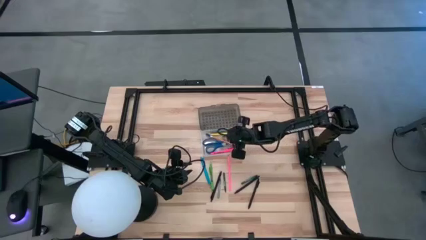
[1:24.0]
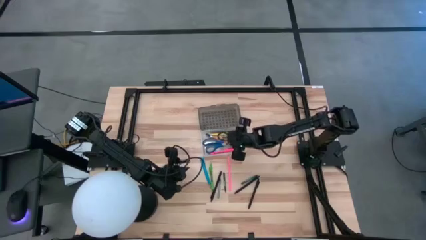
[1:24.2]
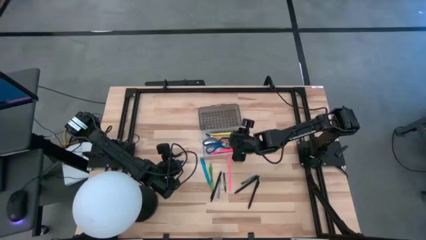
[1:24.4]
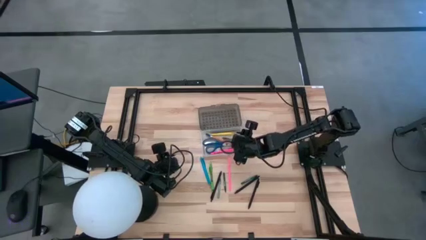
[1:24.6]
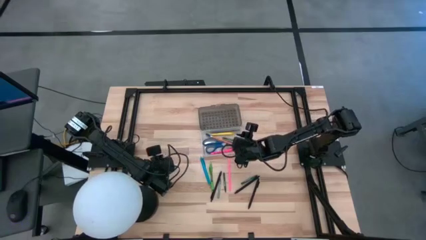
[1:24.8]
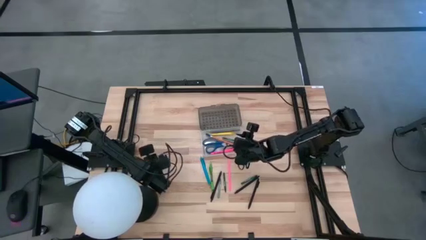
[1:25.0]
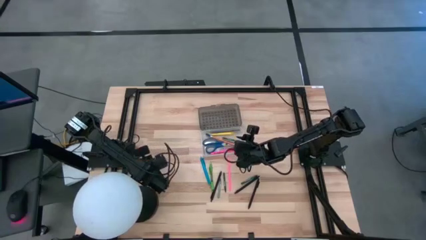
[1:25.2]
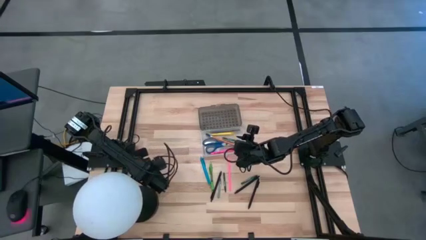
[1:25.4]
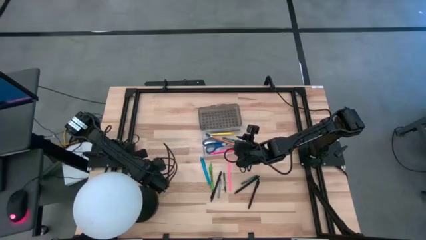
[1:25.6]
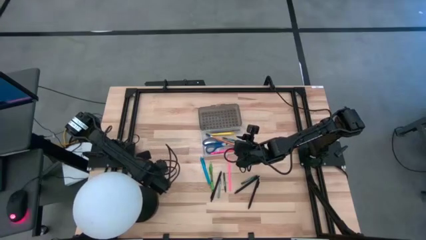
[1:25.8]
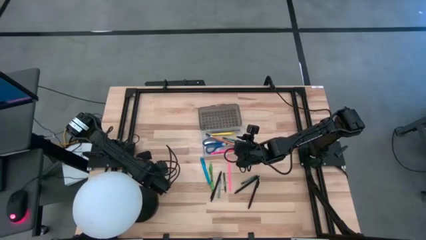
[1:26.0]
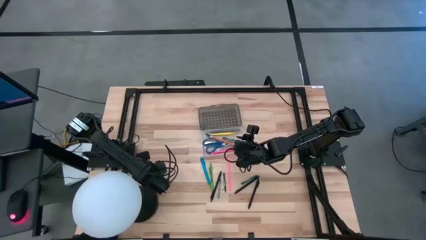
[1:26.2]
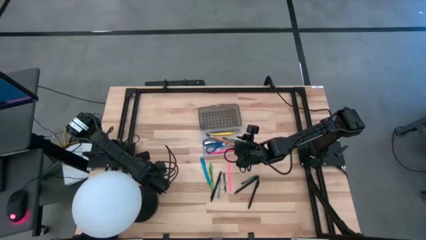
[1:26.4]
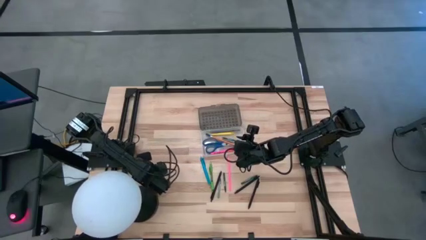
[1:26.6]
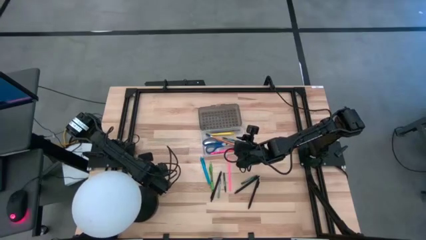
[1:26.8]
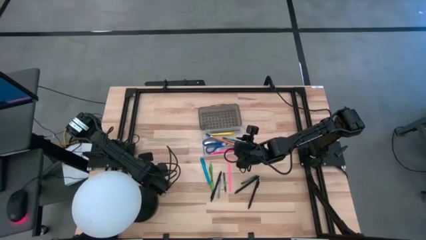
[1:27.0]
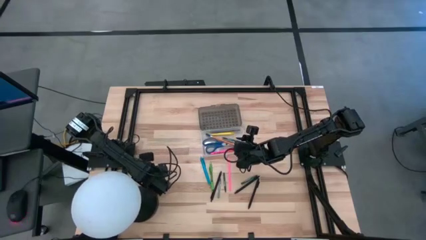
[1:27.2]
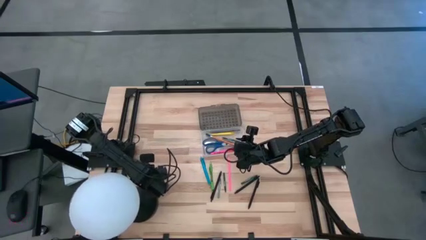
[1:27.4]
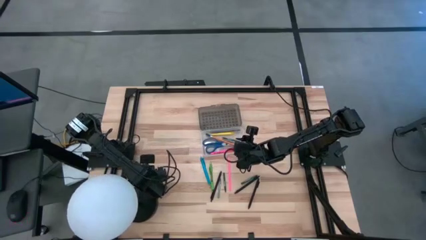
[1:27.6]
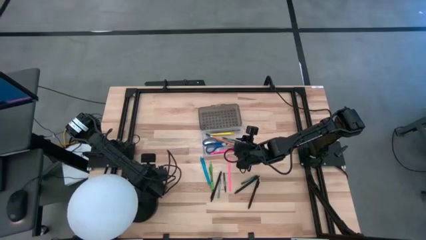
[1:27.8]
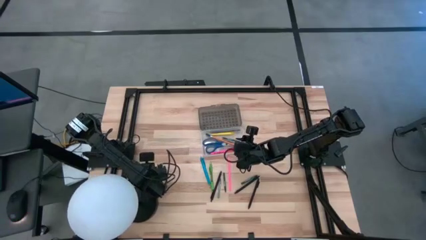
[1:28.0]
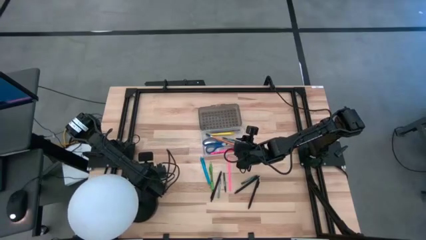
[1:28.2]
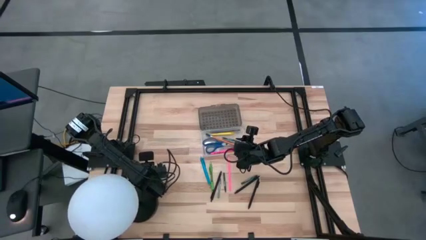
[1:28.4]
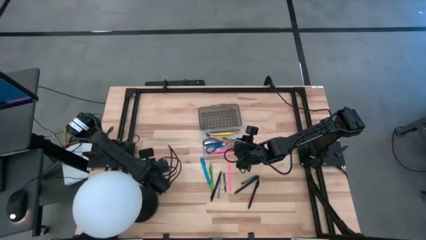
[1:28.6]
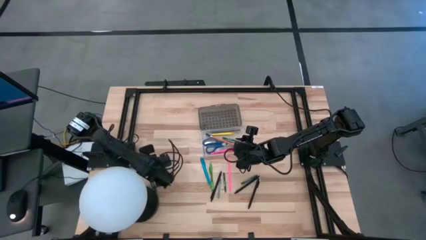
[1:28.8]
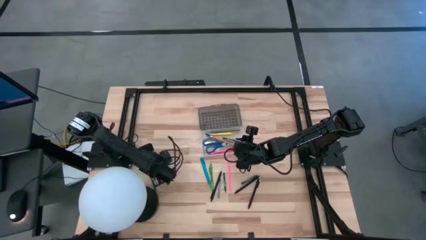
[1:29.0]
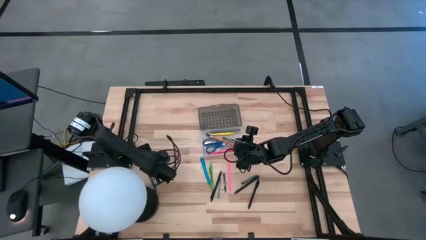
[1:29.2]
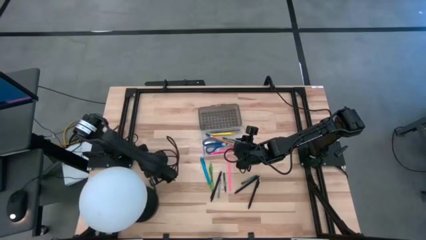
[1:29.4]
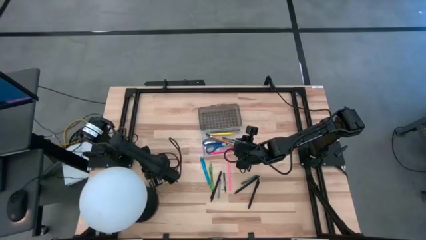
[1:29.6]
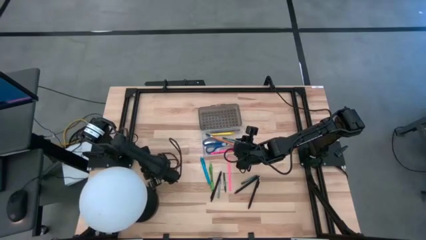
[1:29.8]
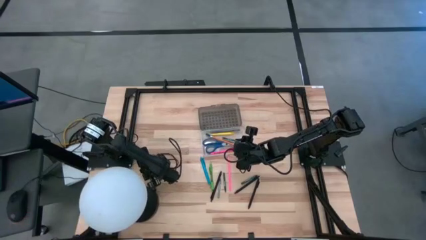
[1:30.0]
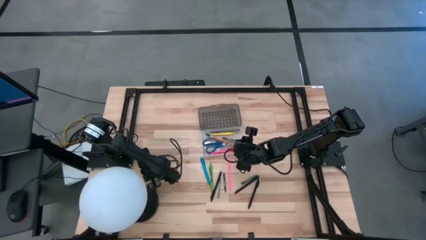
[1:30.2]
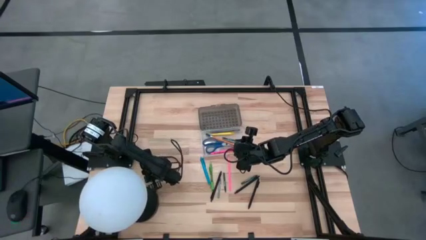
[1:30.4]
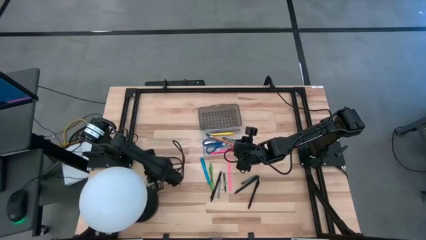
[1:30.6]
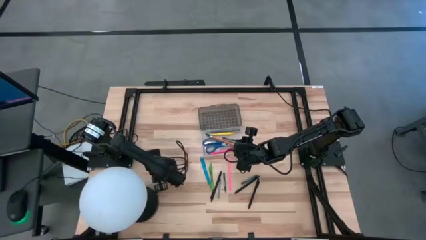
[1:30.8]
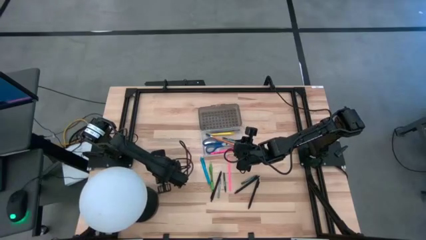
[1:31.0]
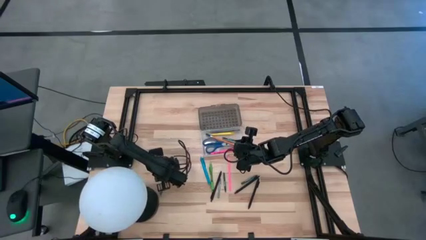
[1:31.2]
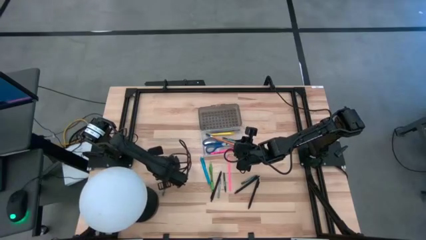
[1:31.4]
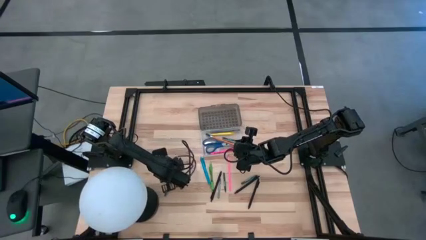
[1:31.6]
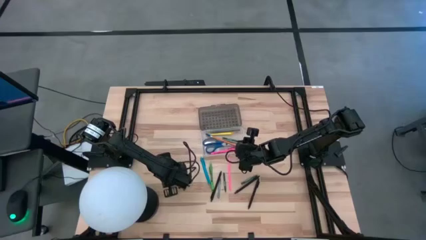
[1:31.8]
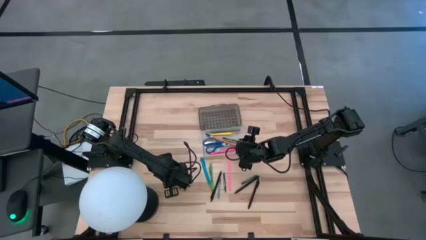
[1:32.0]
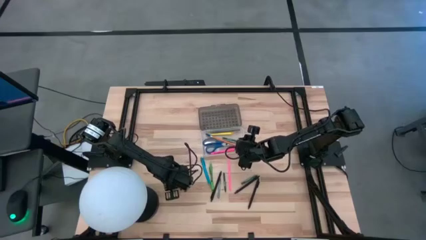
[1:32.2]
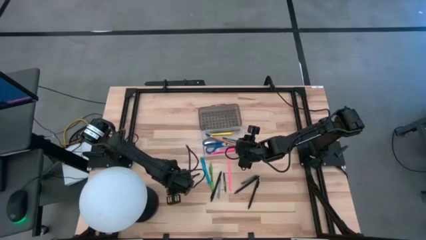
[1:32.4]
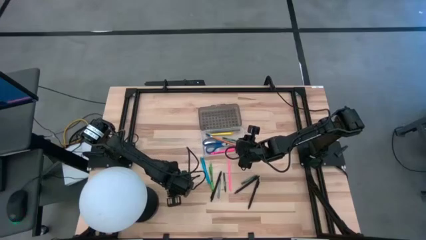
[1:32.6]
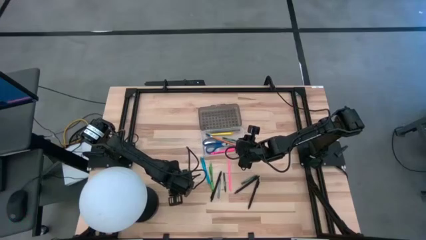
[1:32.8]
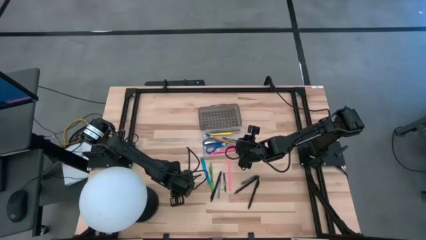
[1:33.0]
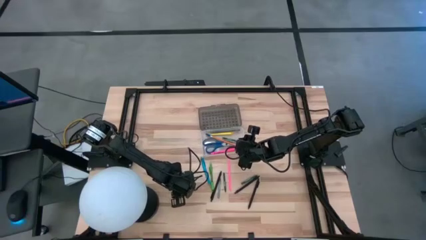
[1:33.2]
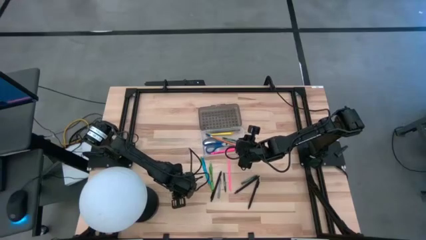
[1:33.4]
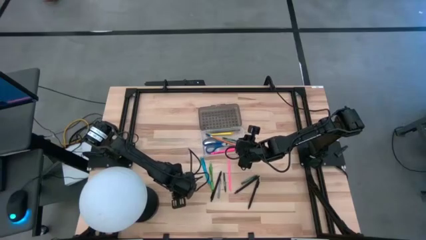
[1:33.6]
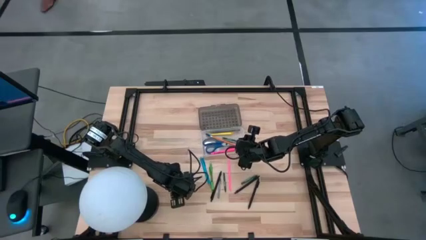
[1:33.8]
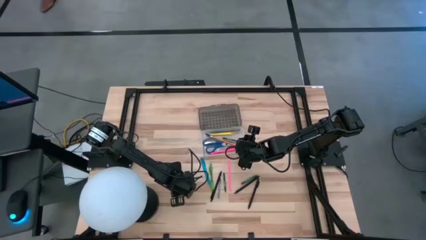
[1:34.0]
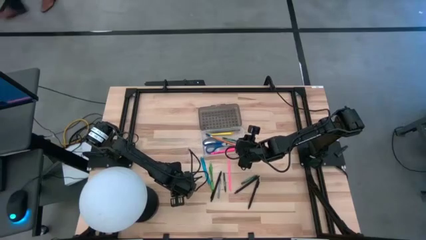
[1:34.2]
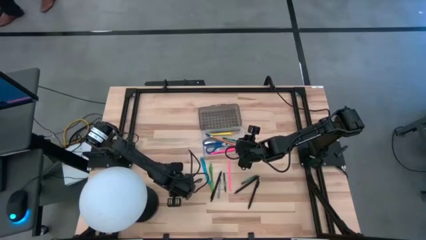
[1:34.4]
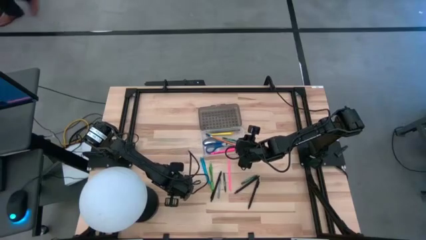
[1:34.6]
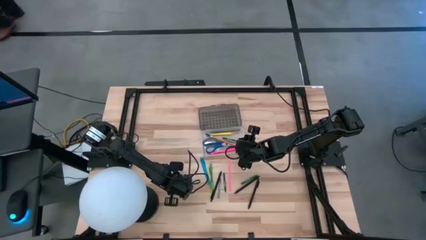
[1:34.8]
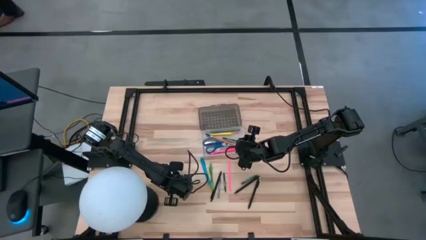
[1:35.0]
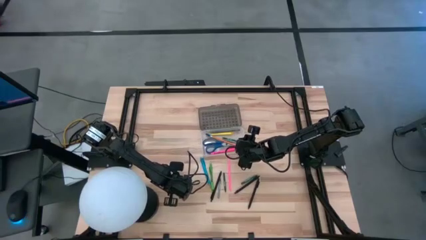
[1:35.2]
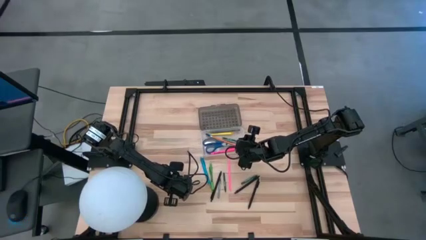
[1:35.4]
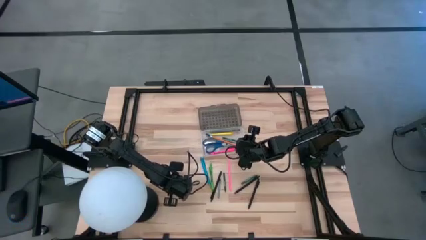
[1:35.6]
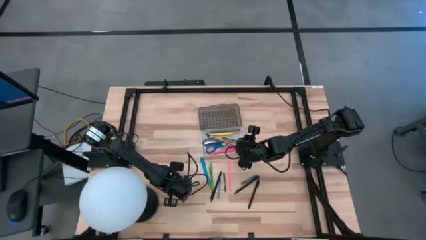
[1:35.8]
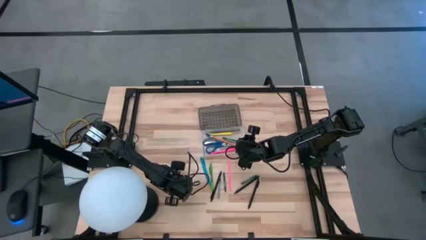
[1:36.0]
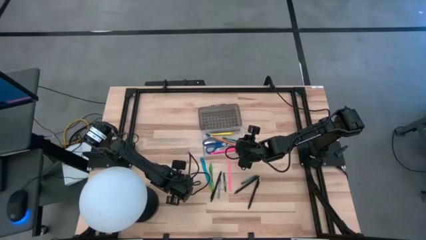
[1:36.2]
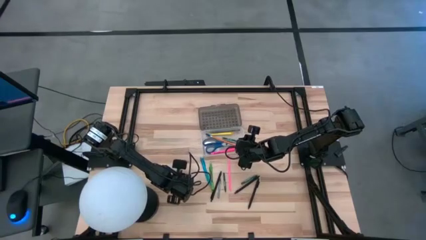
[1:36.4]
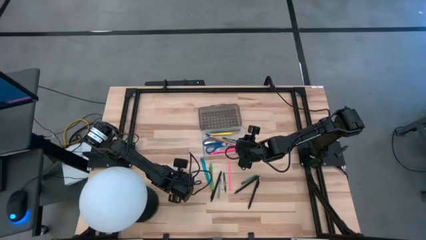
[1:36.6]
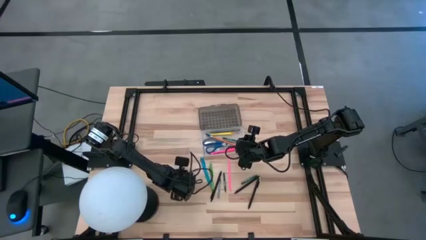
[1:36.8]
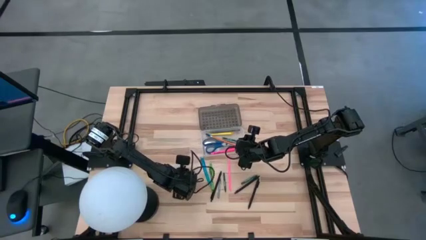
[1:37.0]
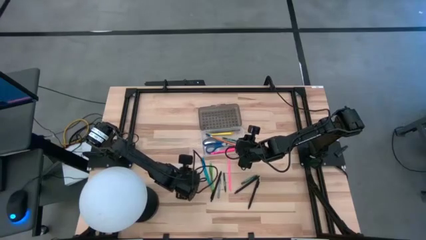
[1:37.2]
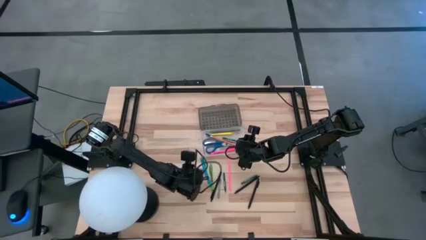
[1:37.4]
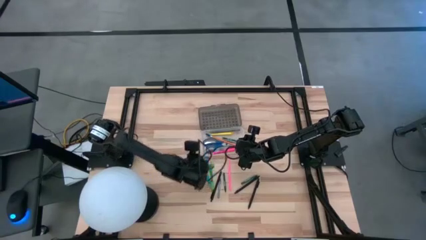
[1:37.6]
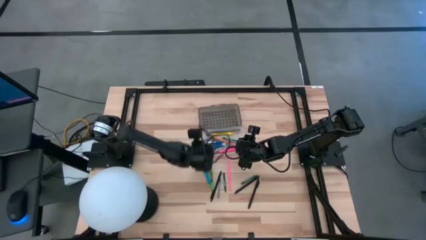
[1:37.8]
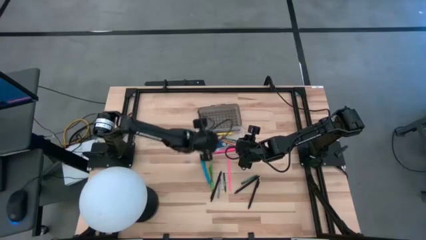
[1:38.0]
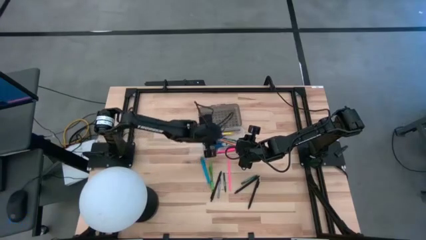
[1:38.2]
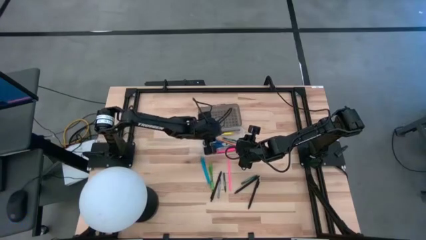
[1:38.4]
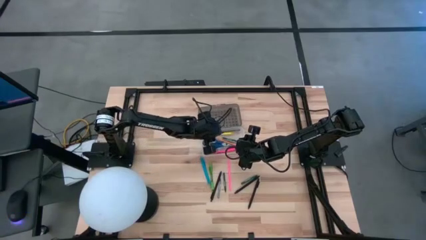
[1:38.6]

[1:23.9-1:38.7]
Task: Pick & place school supplies into a supply box
Put the green crayon into the supply box

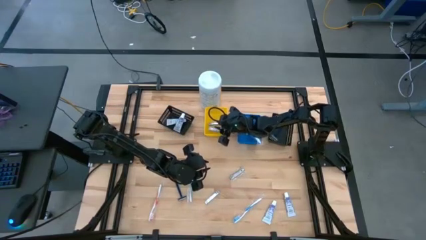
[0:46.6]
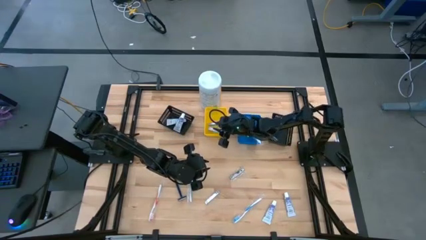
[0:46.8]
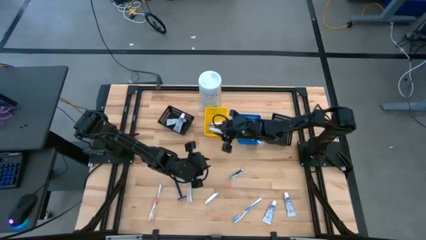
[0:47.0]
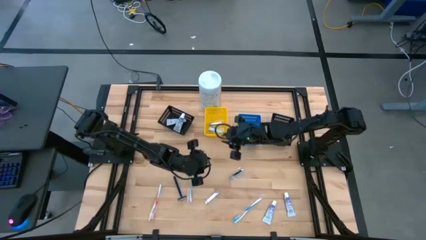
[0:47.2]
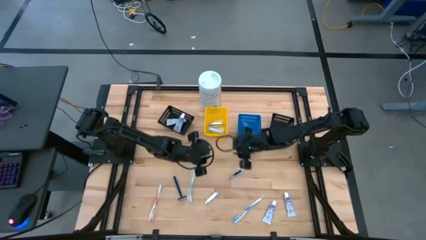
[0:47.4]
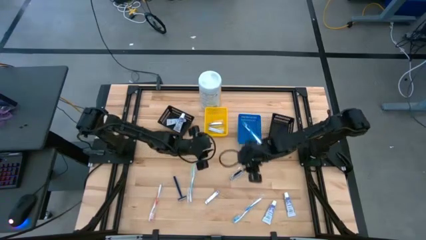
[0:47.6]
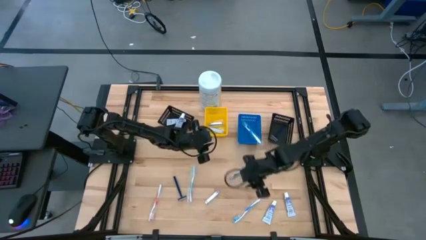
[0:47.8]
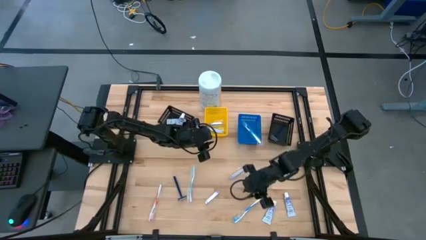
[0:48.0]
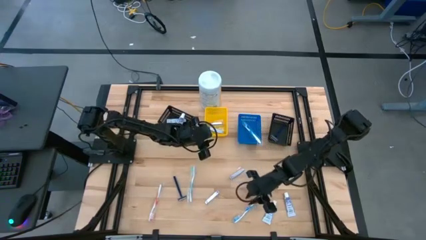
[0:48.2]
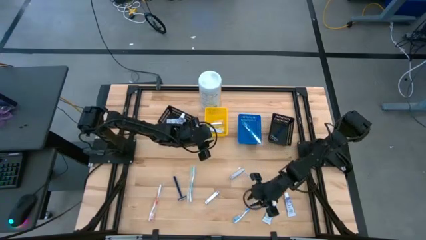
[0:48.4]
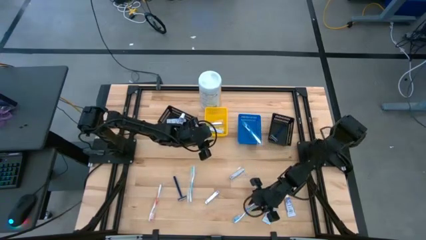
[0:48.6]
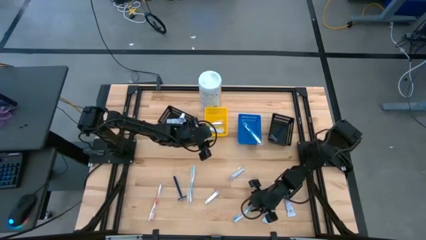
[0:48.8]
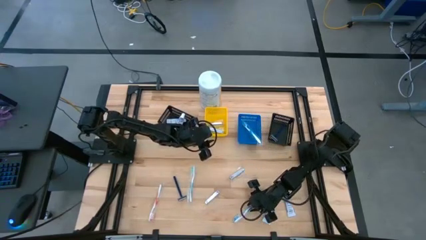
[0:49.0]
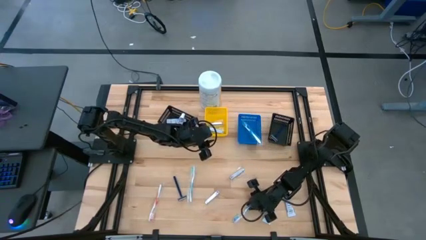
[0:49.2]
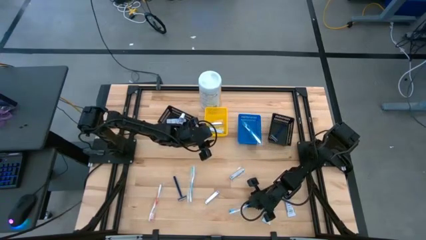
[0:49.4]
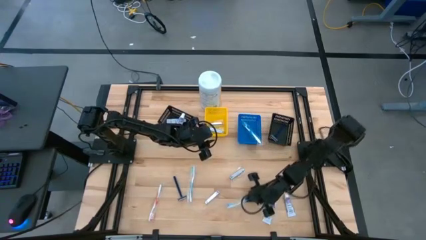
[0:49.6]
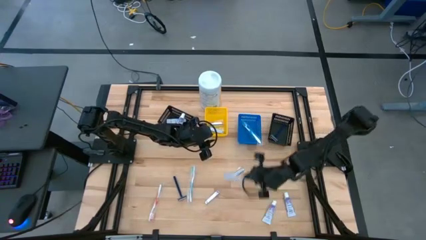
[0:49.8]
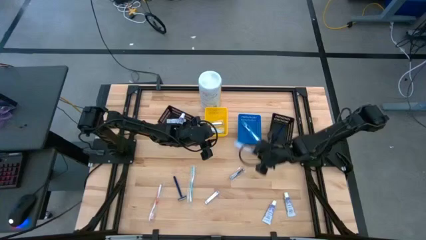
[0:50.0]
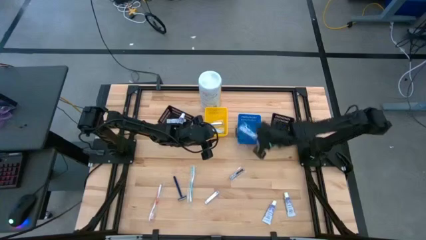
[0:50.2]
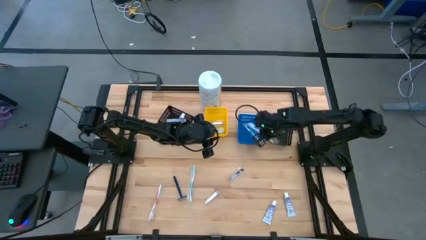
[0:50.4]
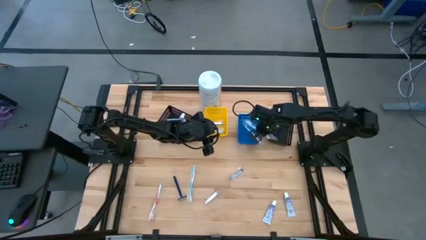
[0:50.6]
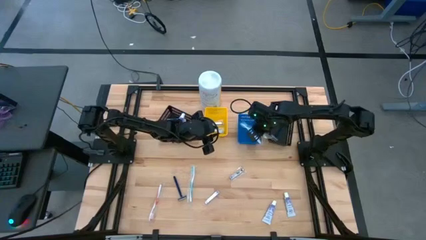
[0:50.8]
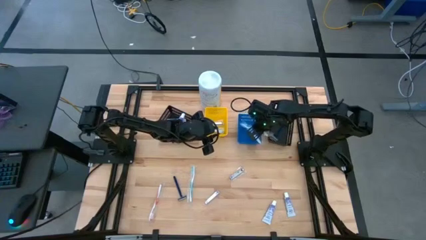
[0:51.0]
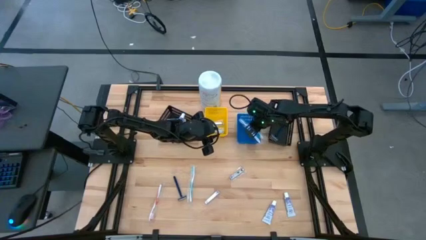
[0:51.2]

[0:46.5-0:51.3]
Task: Pick & Place Travel size toiletries
Put the blue toothbrush into the blue bin
